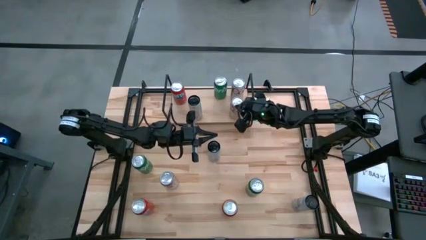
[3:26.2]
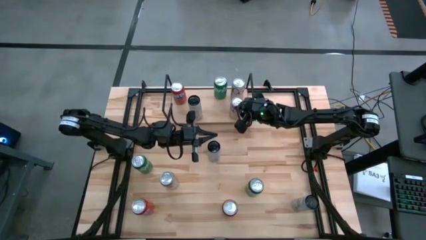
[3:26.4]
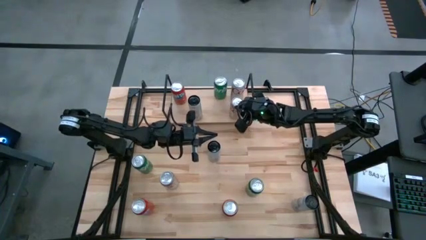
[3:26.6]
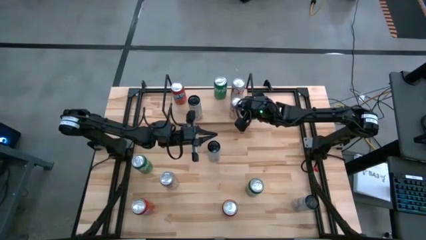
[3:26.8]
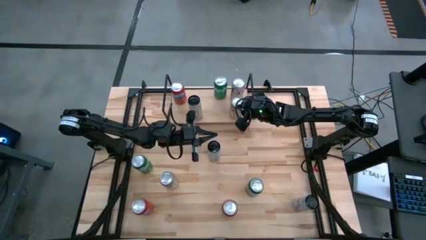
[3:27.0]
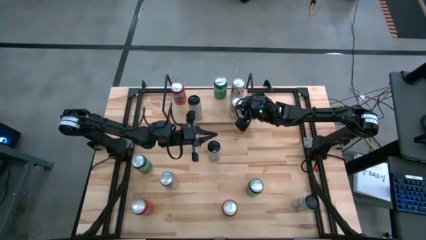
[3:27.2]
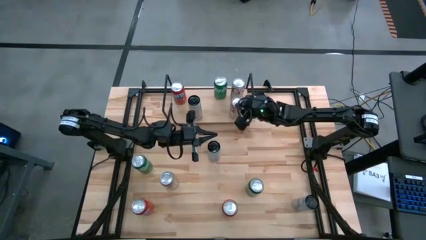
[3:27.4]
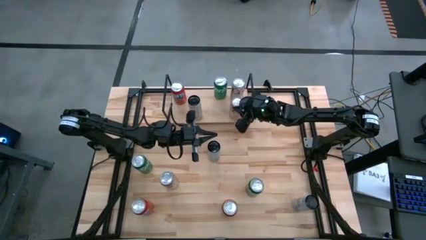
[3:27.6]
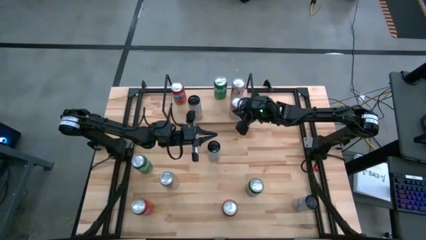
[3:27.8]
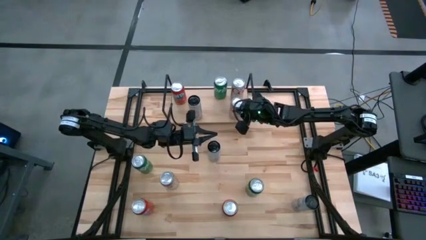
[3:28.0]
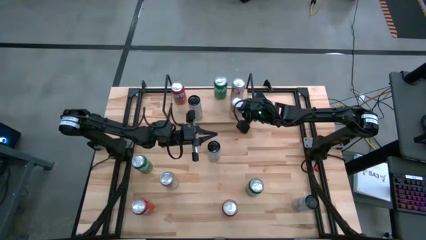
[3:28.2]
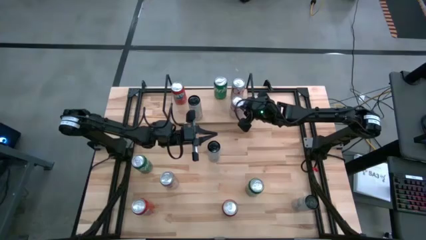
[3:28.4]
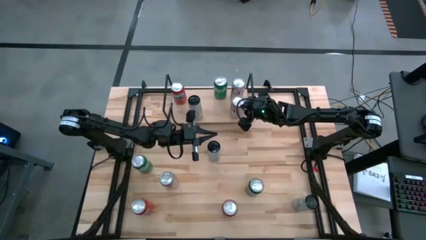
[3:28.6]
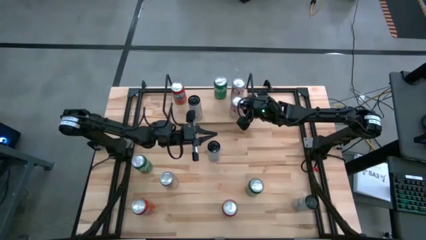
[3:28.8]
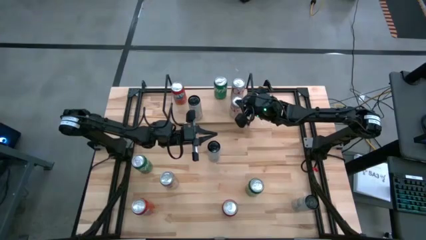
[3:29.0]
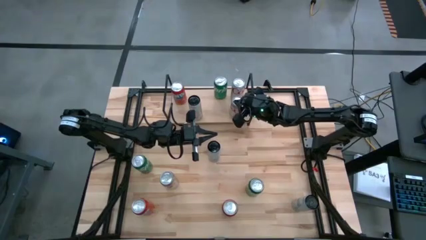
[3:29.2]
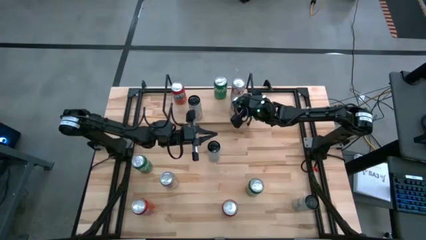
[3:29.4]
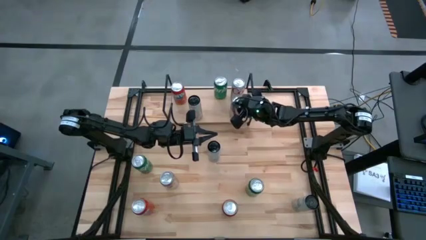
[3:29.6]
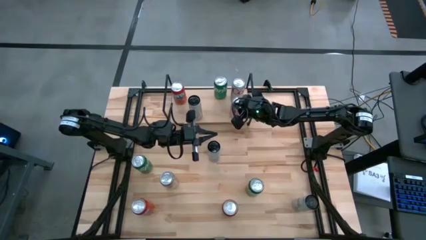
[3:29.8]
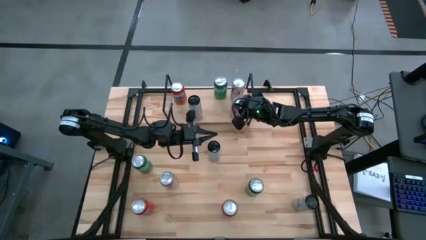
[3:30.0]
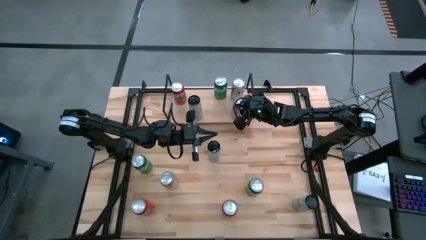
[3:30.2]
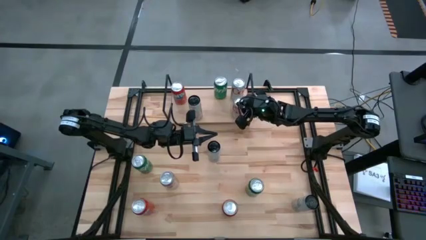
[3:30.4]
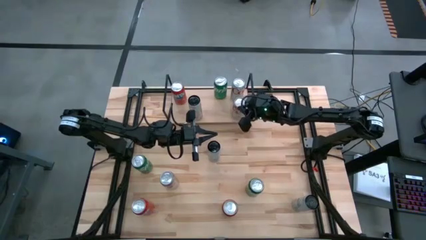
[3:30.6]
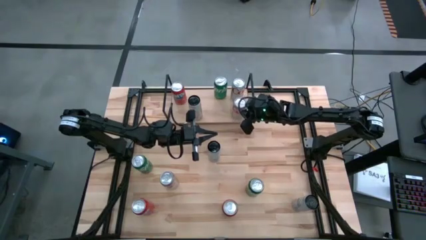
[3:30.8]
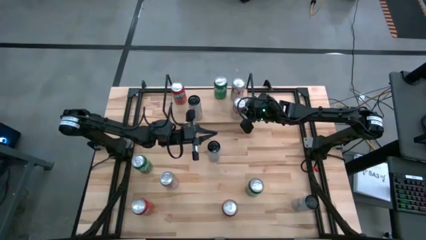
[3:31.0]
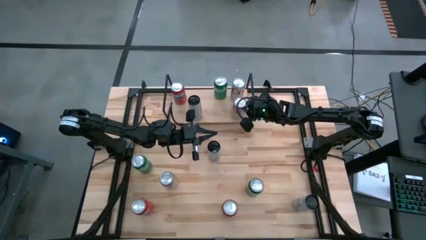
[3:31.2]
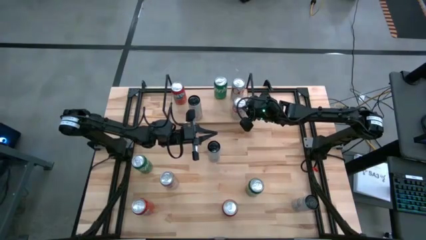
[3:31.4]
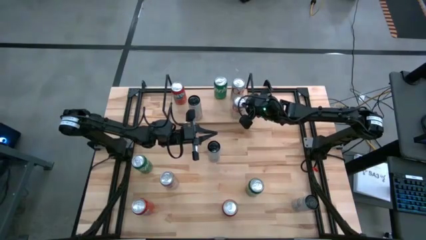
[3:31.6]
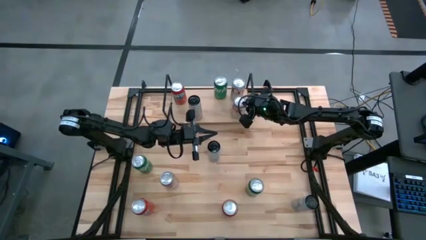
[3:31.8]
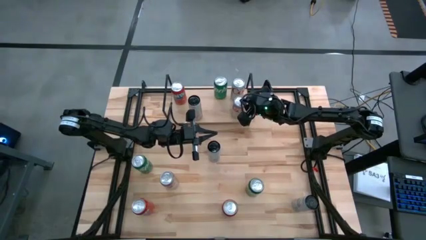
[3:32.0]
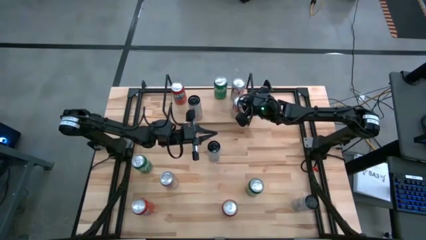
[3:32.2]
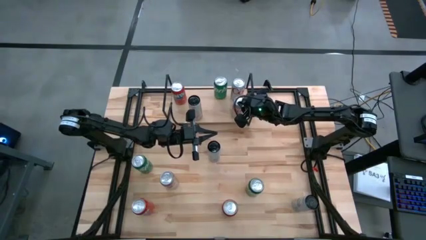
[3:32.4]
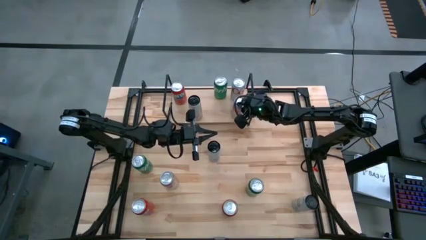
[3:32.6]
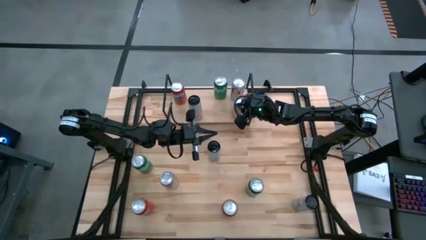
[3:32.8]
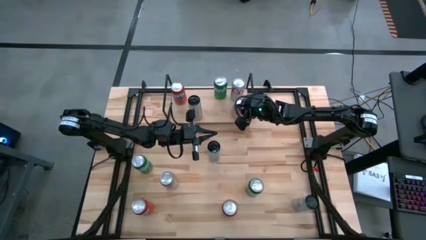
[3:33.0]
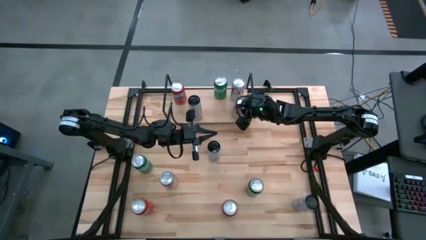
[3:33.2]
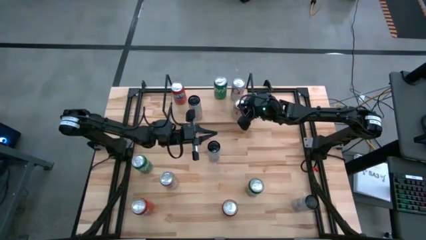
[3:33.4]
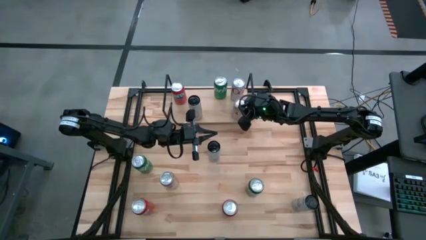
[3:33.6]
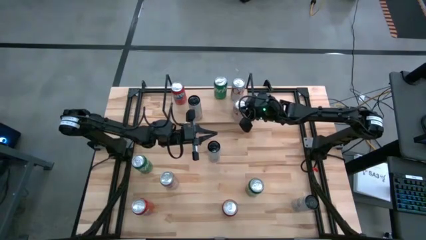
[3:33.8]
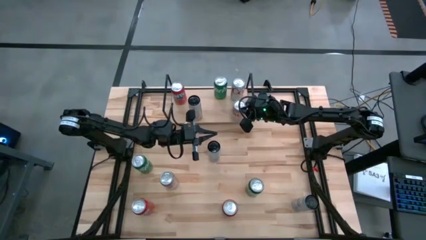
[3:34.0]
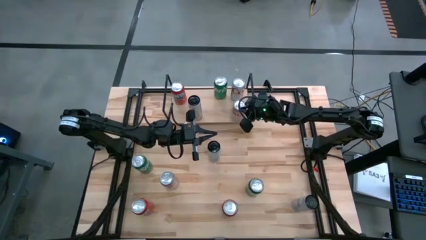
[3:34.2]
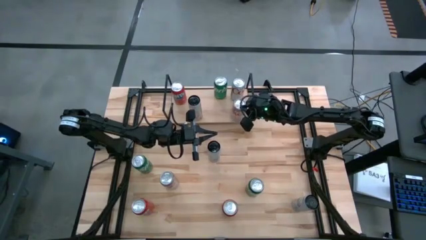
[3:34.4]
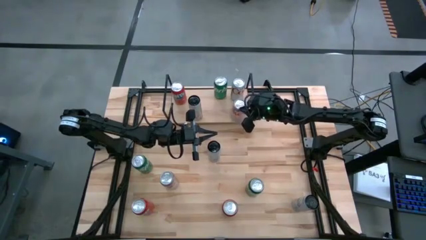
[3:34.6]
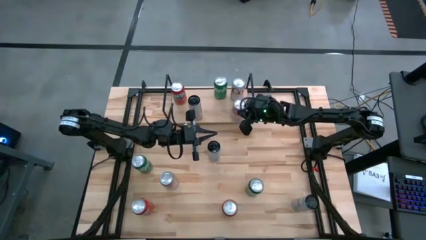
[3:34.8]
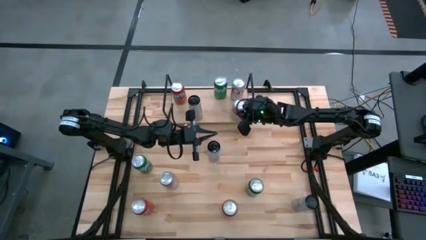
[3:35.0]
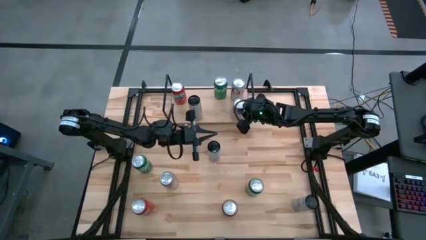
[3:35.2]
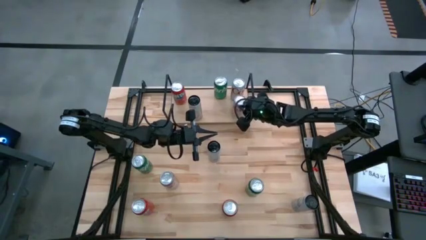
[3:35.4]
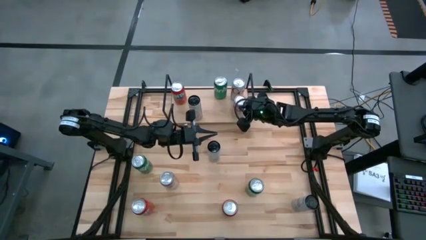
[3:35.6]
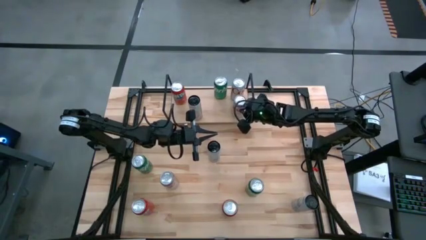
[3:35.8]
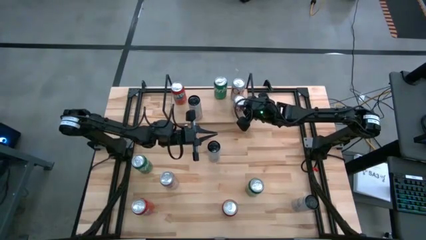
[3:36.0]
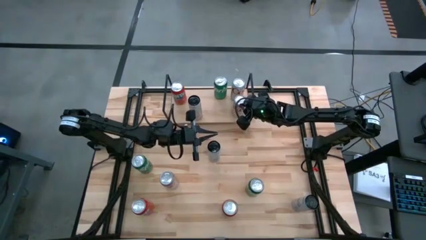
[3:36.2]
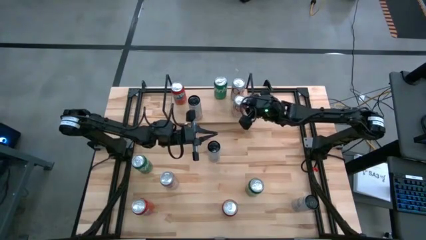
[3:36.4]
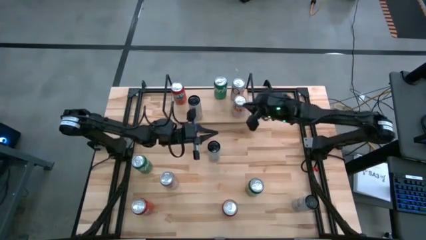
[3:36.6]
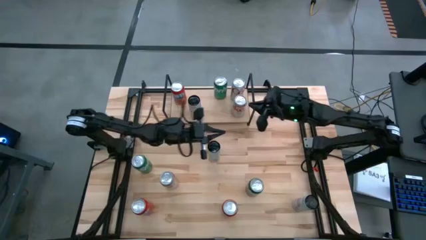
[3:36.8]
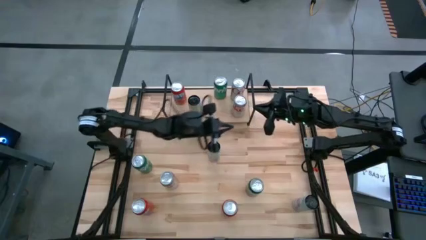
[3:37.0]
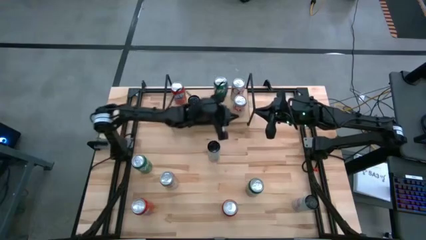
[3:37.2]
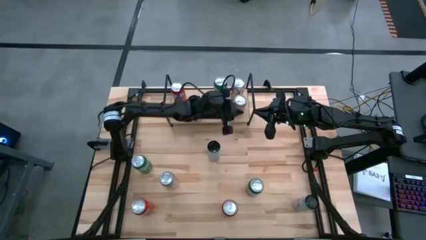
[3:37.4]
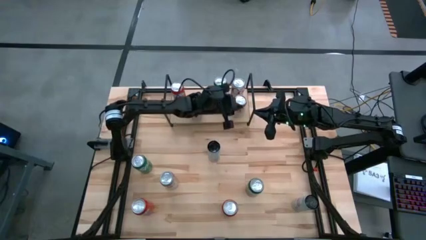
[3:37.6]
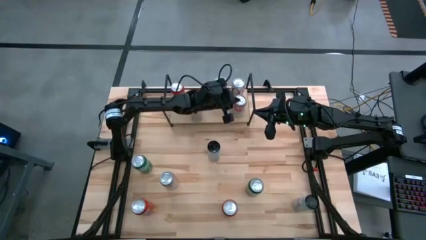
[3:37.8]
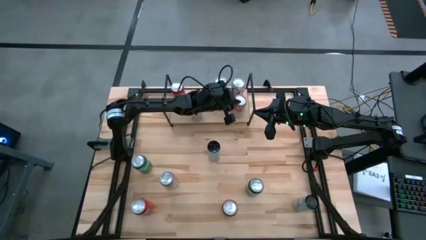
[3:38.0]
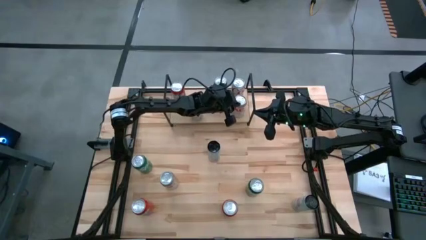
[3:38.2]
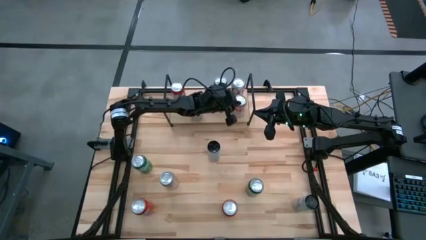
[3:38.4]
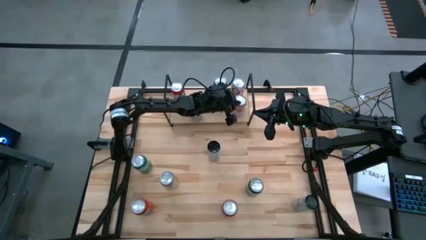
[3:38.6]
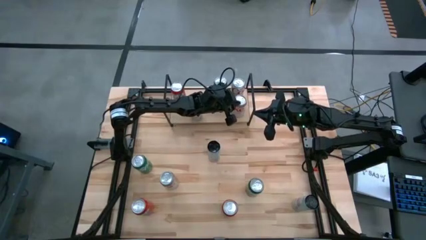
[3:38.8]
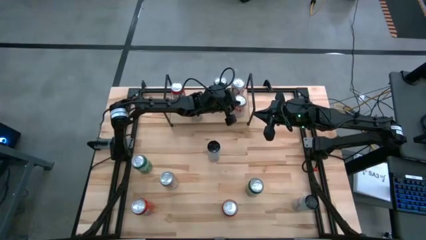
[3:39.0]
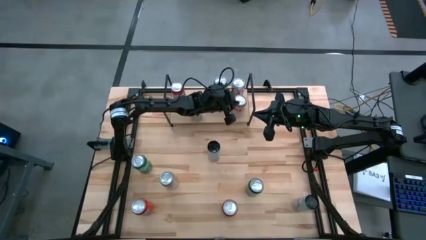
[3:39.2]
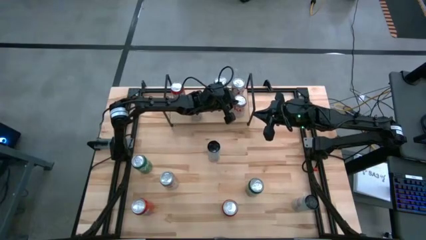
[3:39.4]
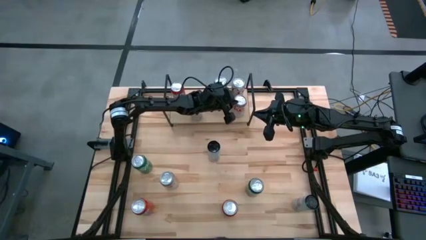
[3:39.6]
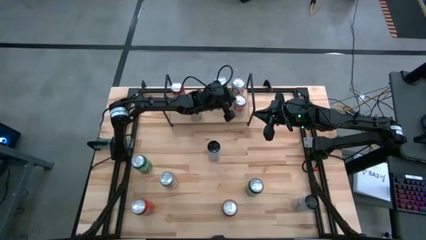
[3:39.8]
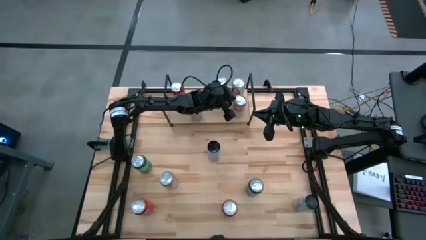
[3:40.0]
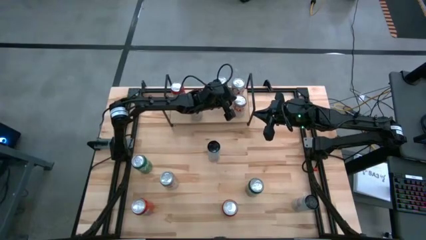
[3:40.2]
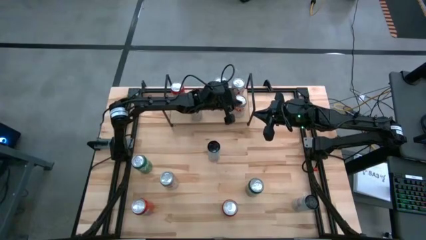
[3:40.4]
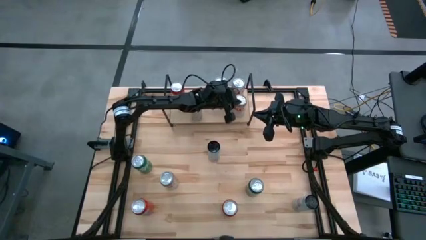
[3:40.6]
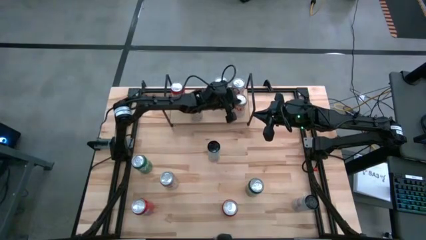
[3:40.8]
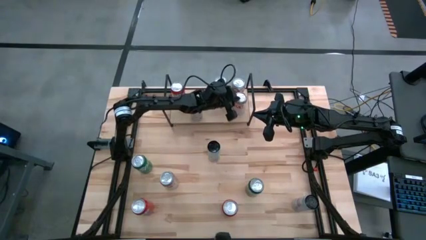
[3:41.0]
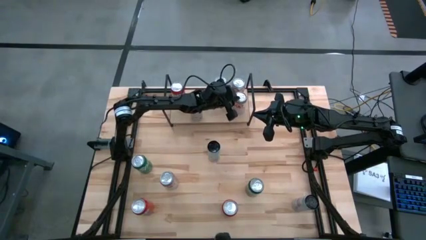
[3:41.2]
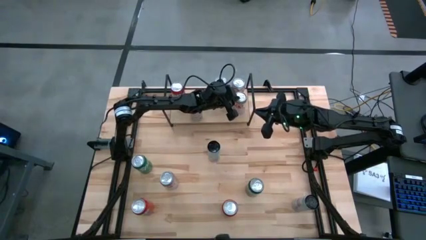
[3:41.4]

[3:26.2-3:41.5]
Task: Sort soda cans
Put the top red silver soda can on the shelf and align it with the other red silver soda can
